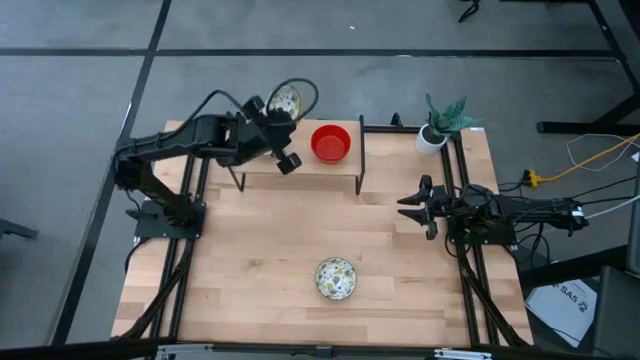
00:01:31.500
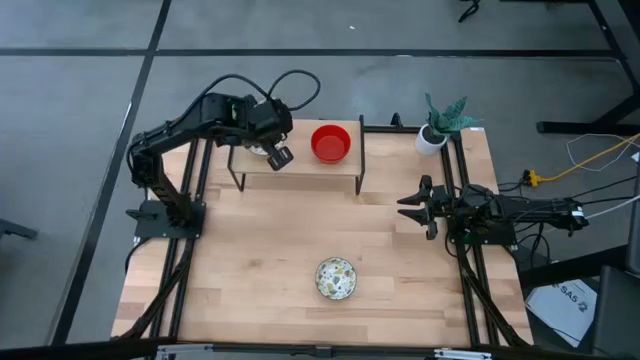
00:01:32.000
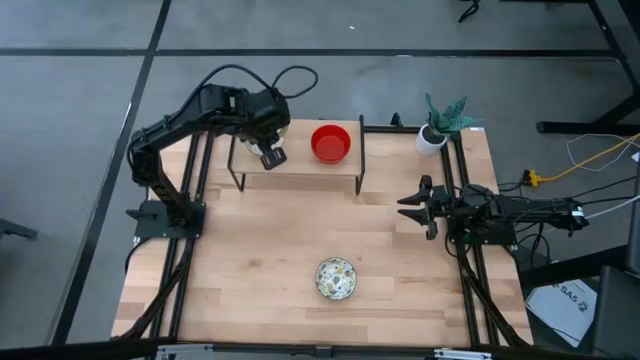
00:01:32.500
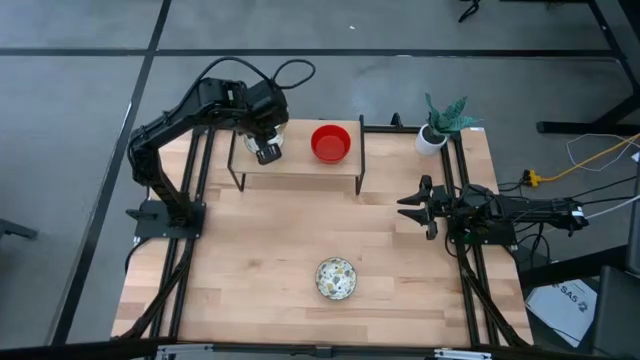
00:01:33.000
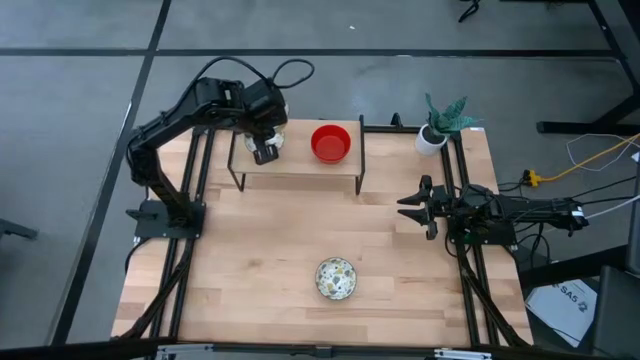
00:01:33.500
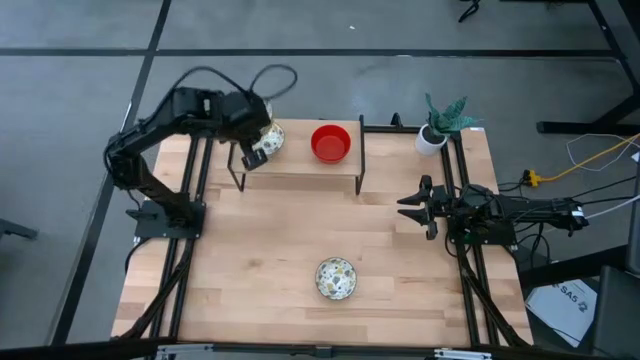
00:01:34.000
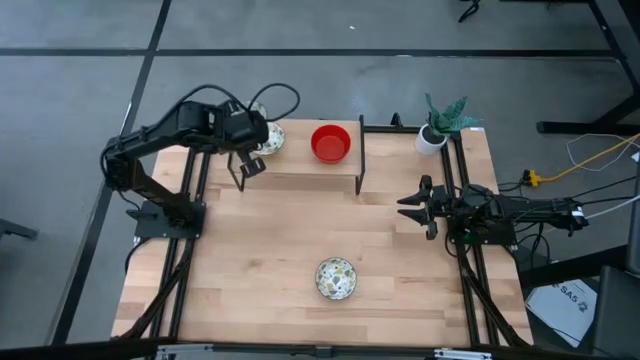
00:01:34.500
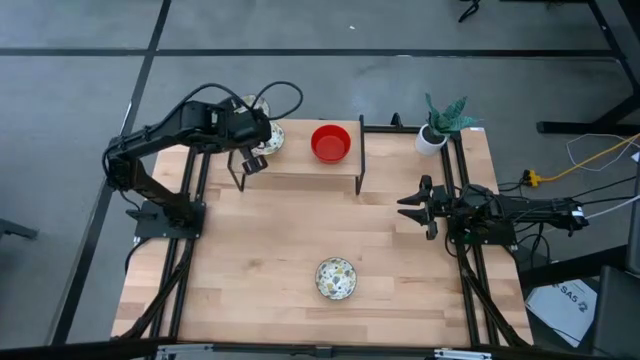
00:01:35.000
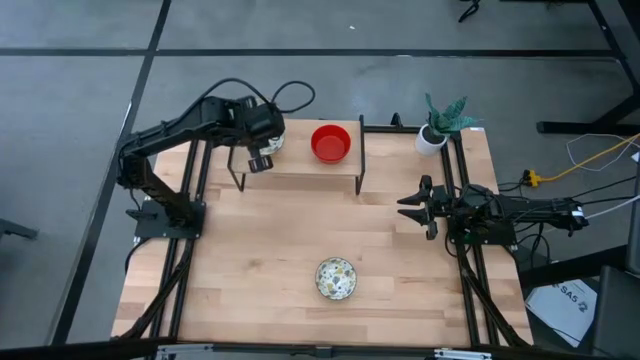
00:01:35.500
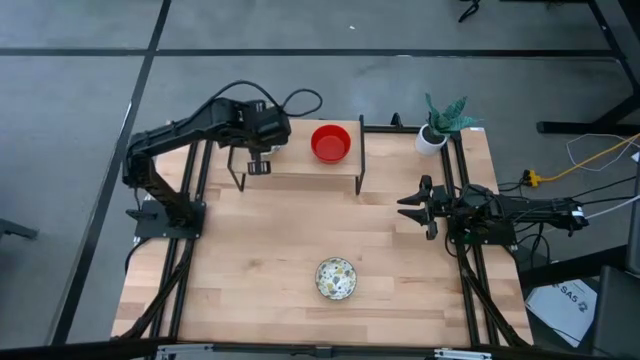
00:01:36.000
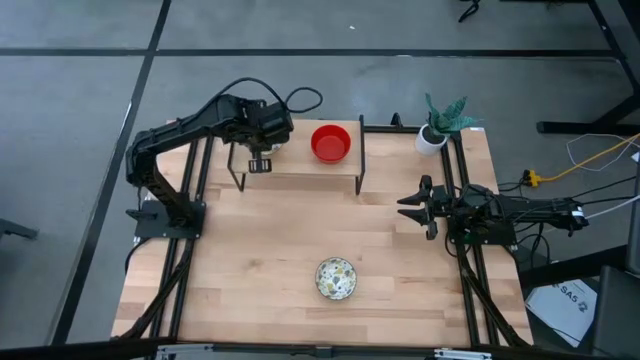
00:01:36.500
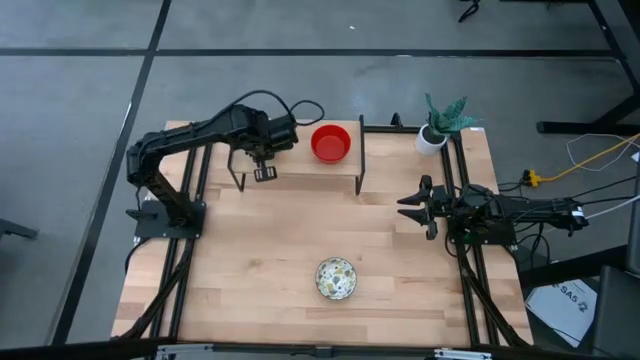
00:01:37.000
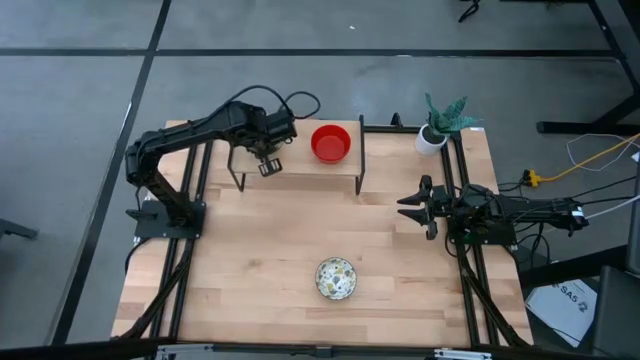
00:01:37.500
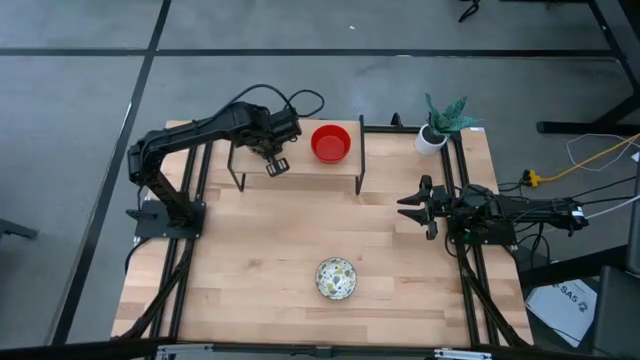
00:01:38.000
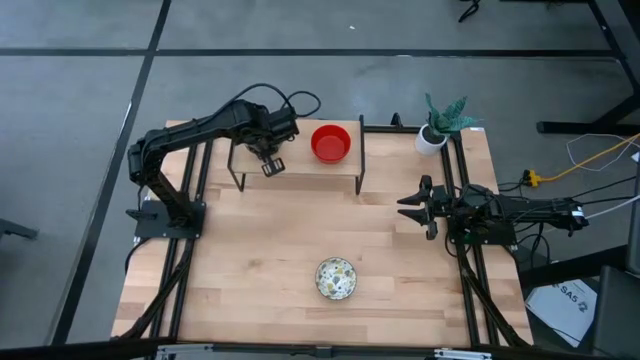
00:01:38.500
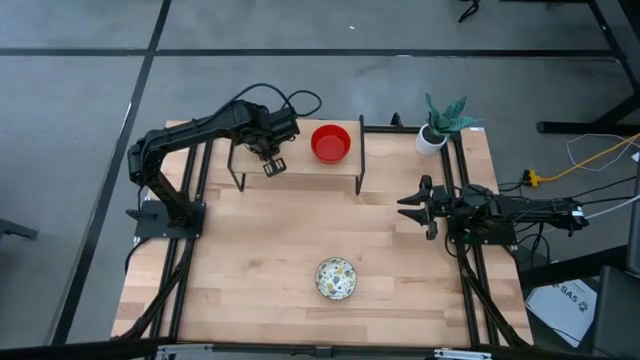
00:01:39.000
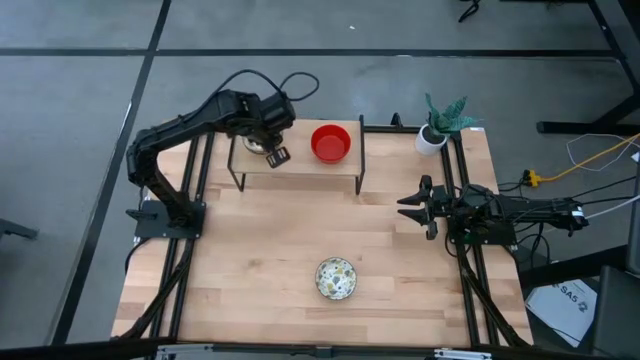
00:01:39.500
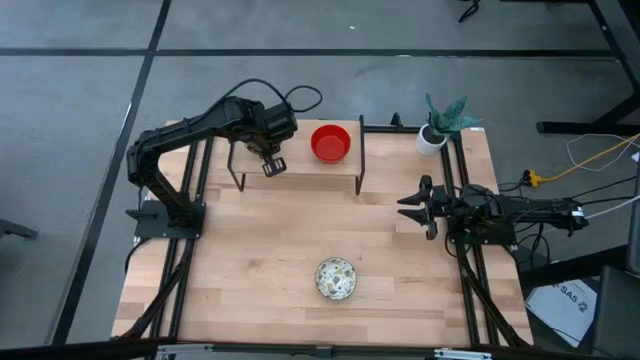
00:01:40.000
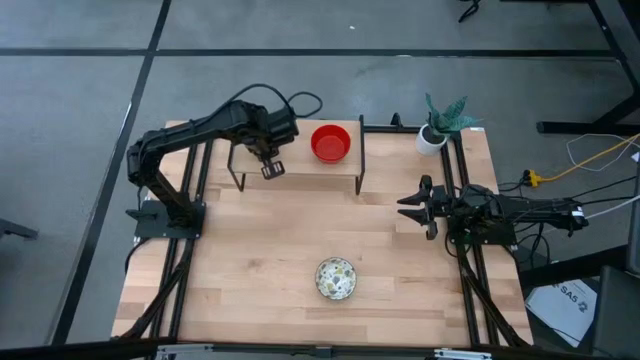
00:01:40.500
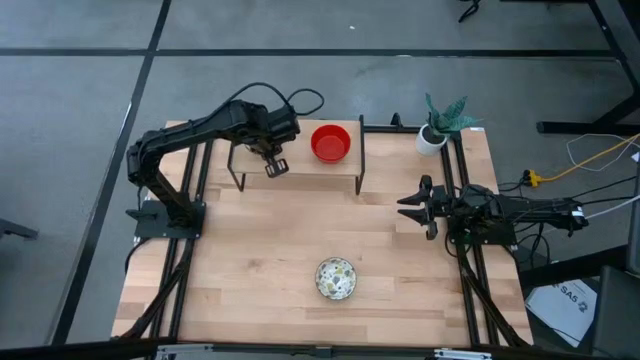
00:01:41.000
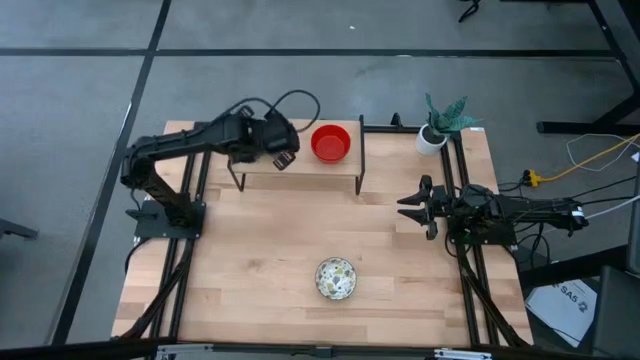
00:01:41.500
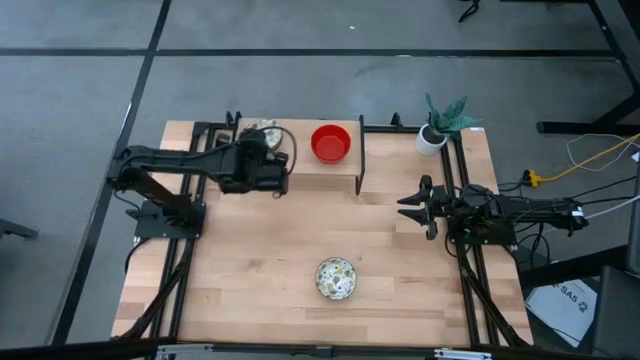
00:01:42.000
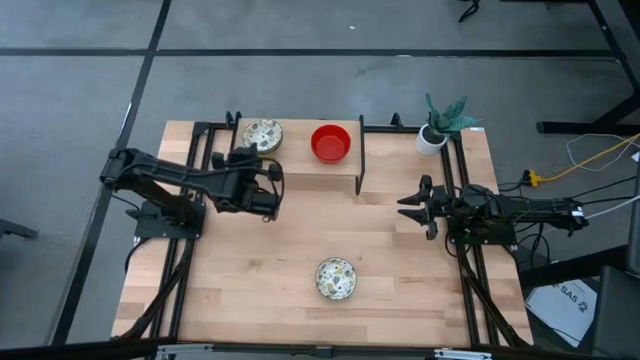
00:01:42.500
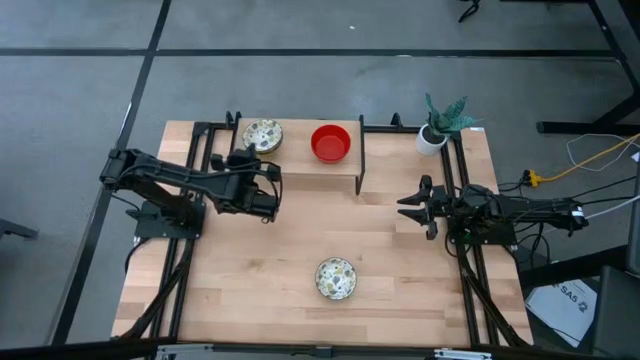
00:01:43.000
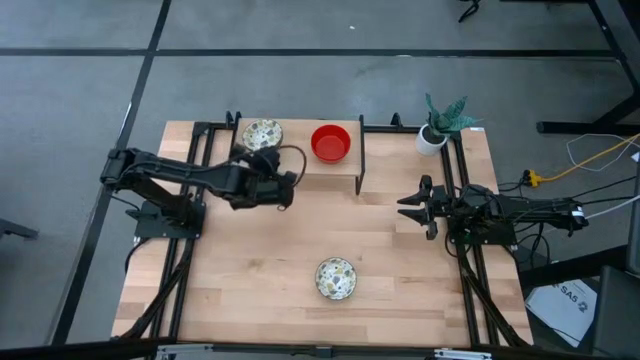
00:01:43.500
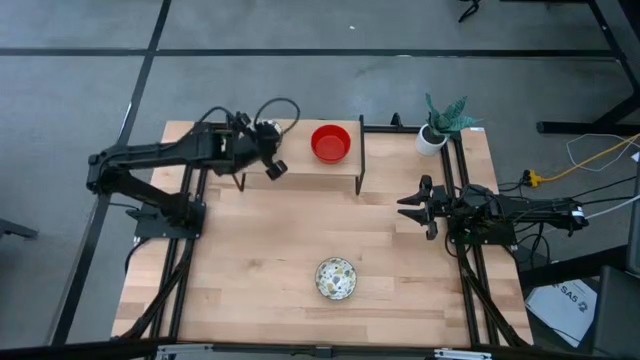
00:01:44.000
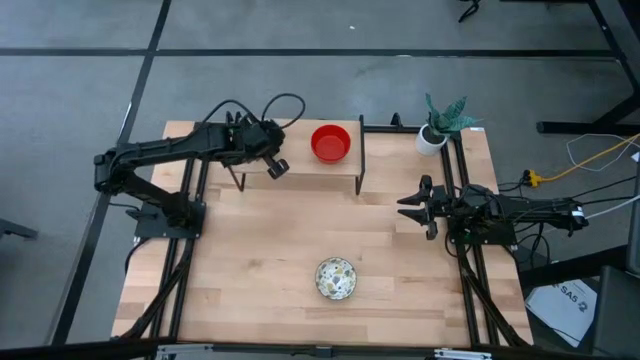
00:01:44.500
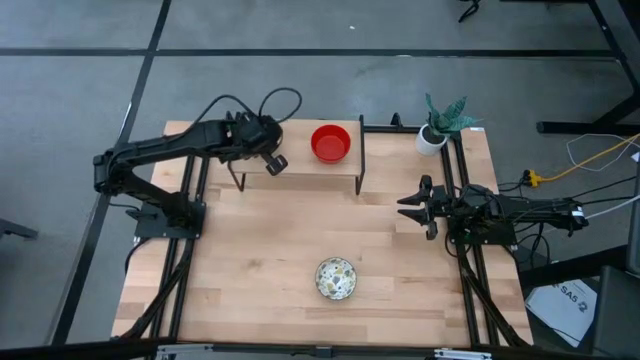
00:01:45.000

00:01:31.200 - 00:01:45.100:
Task: Pick & Place Mini bowls
Stack the top white patterned bowl on the white patterned bowl on the shelf

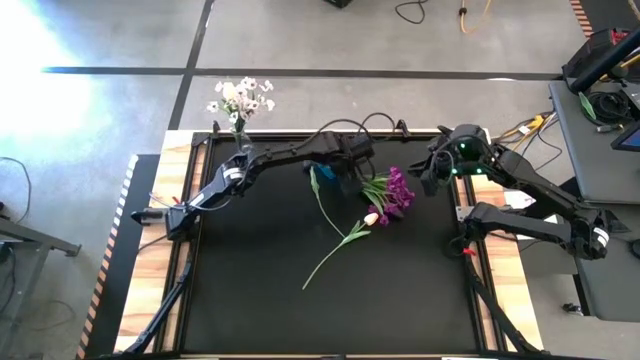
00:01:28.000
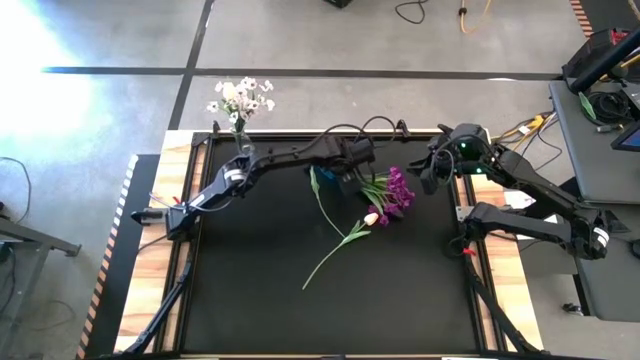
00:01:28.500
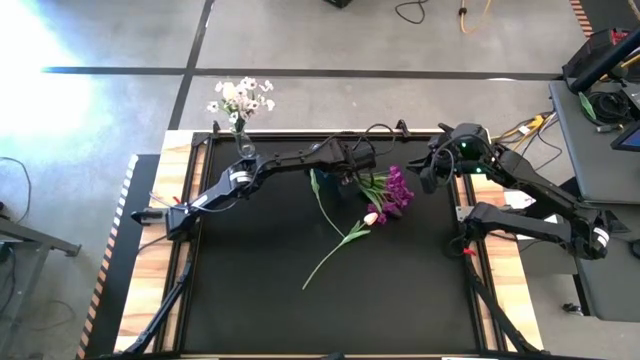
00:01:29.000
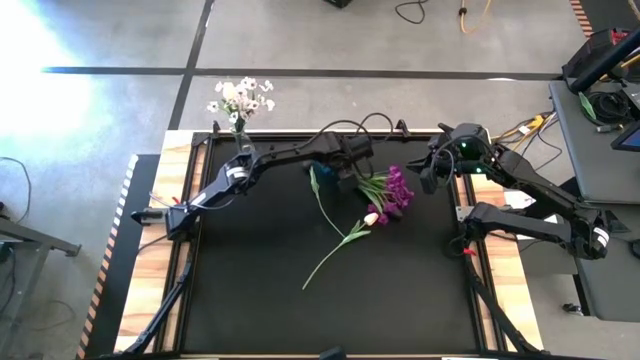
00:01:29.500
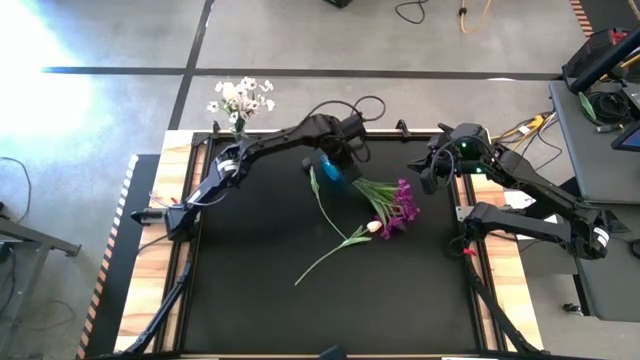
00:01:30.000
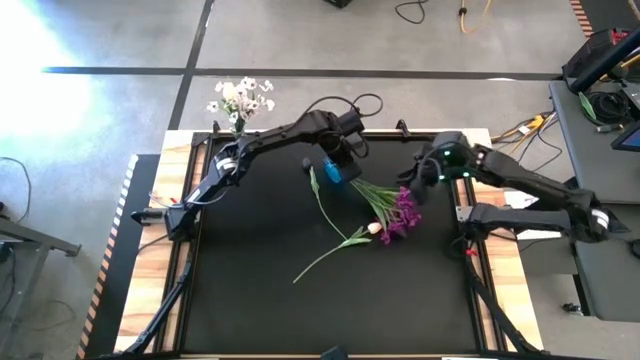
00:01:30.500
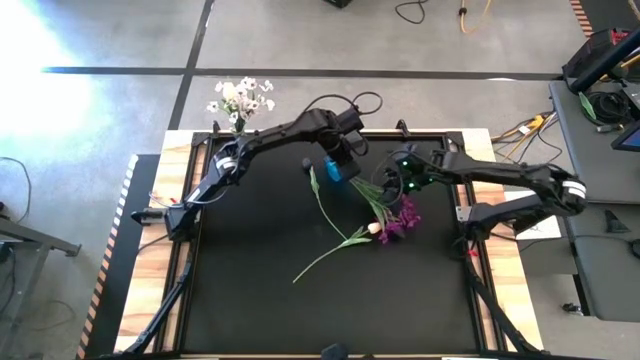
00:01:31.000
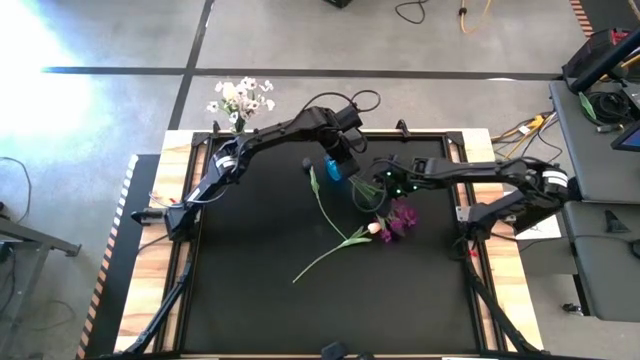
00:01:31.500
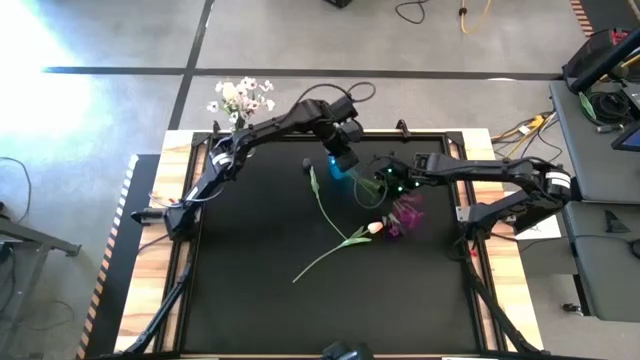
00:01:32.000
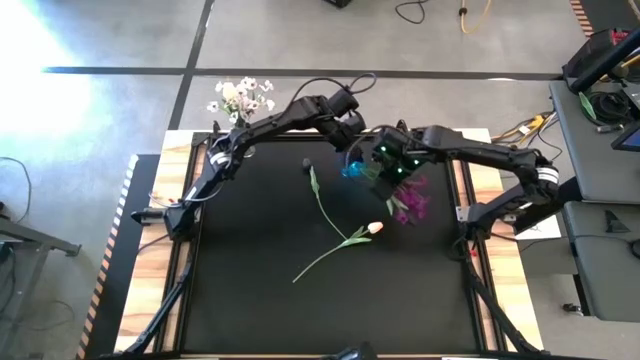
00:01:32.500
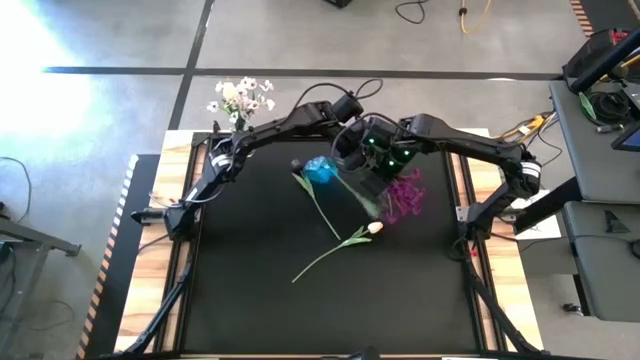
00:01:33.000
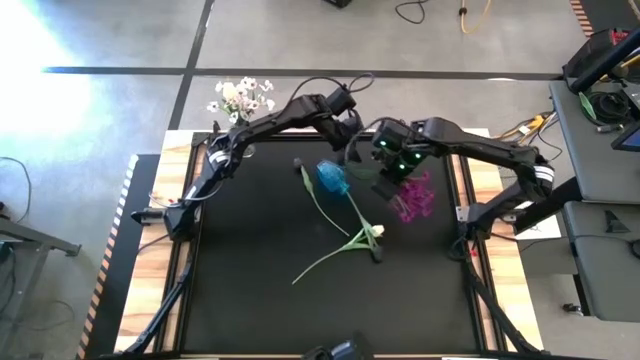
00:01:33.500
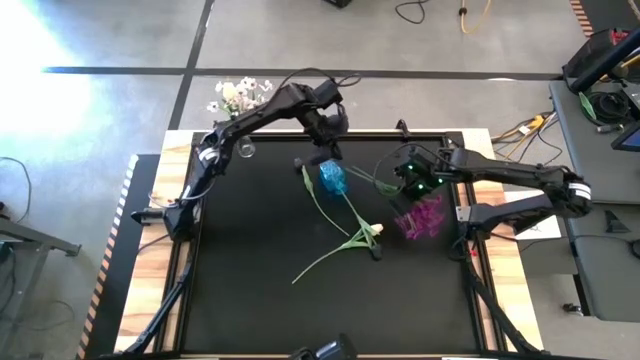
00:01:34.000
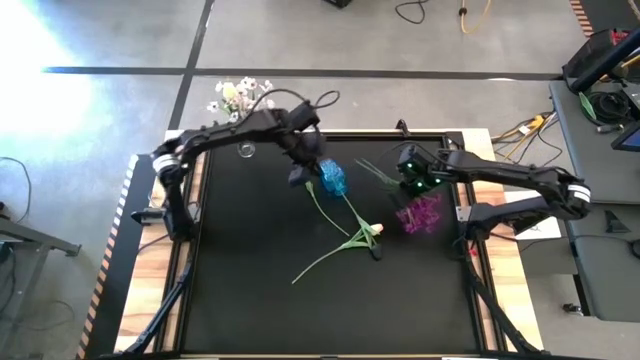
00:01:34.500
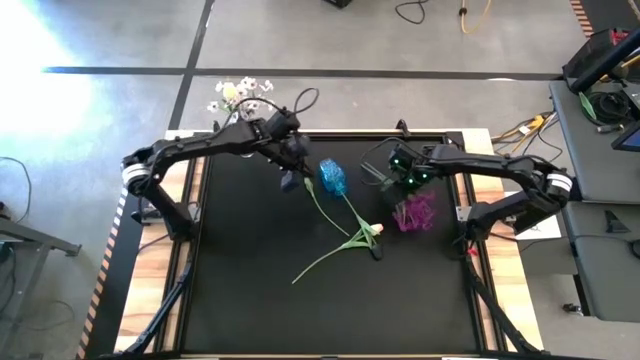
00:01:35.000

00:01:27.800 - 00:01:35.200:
Task: Sort flowers into vase by color
Remove the violet flowers from the blue vase
